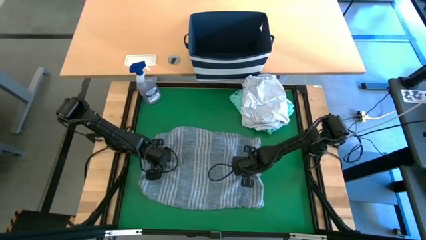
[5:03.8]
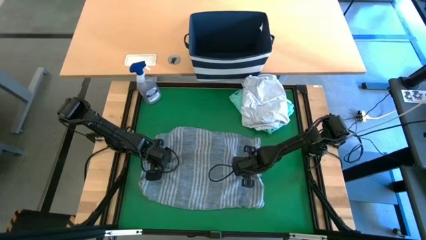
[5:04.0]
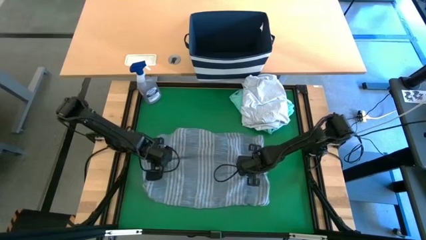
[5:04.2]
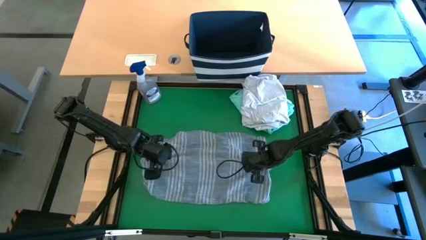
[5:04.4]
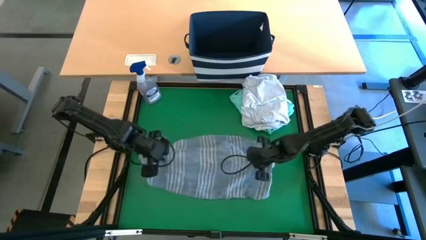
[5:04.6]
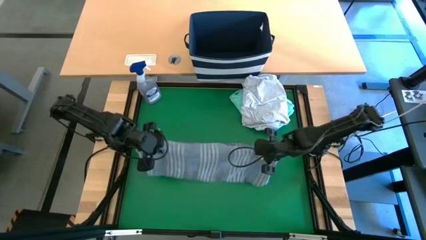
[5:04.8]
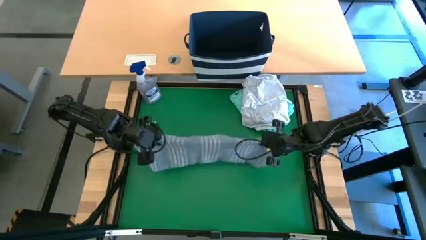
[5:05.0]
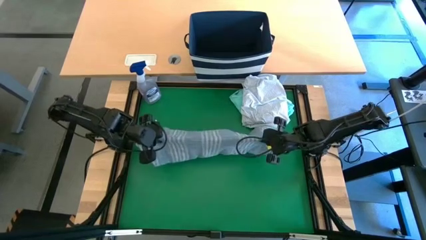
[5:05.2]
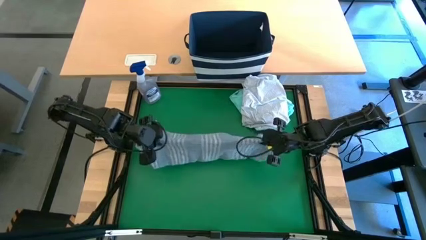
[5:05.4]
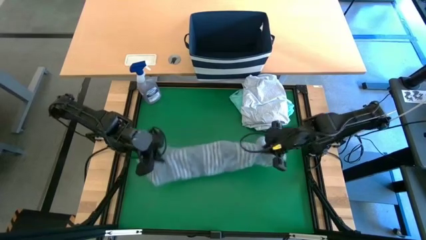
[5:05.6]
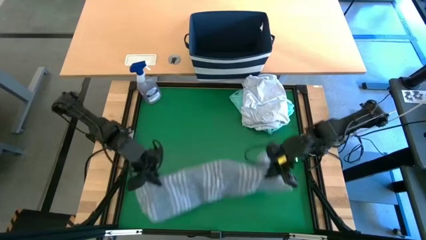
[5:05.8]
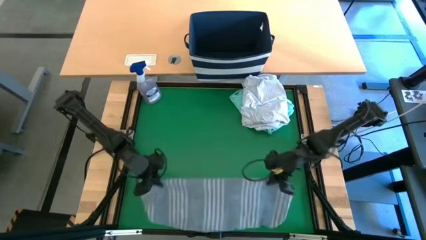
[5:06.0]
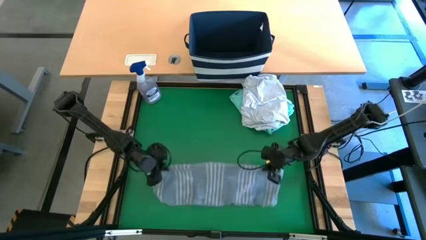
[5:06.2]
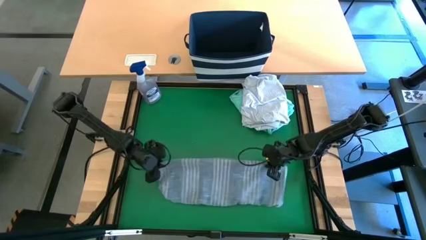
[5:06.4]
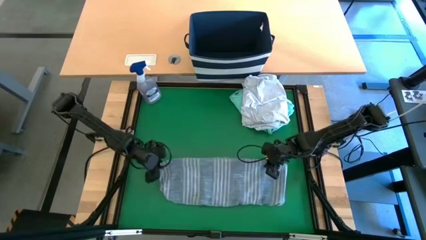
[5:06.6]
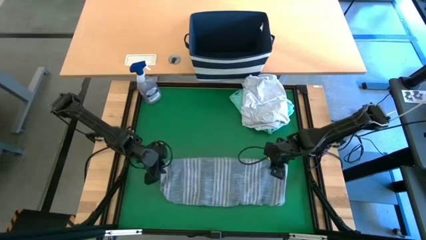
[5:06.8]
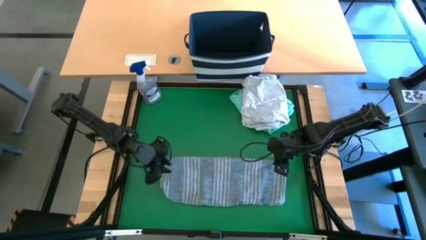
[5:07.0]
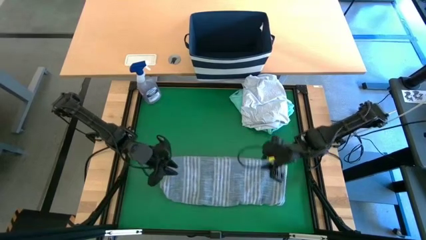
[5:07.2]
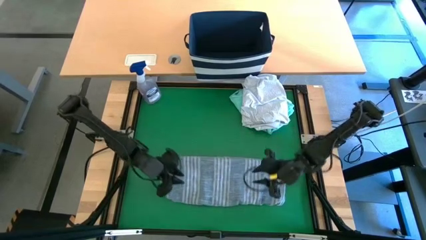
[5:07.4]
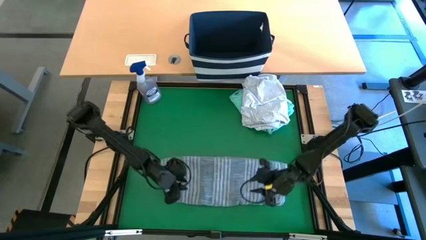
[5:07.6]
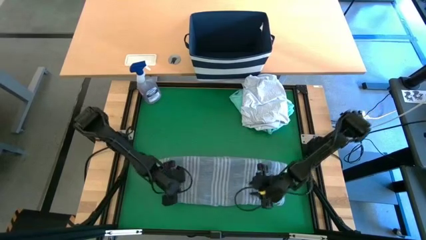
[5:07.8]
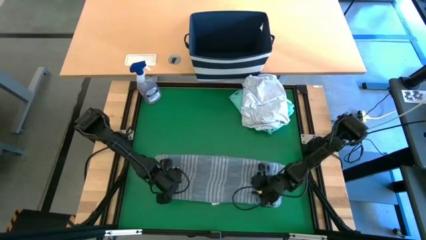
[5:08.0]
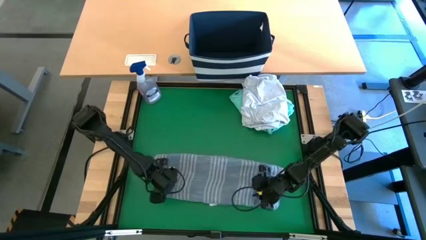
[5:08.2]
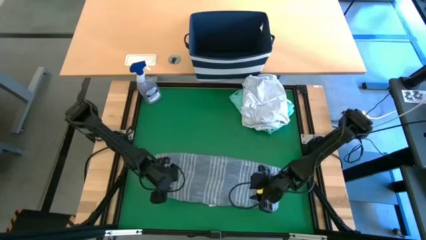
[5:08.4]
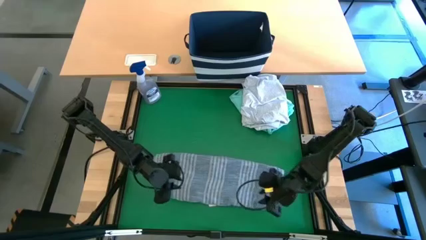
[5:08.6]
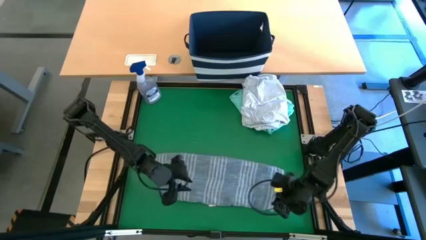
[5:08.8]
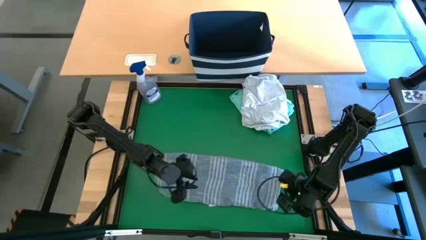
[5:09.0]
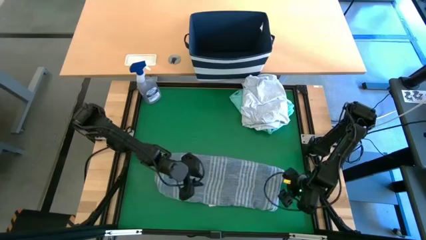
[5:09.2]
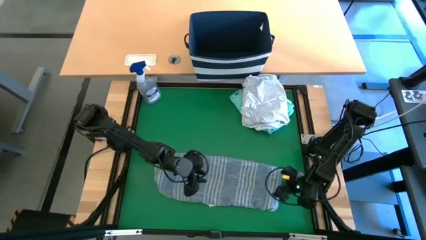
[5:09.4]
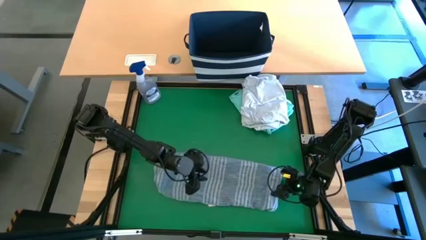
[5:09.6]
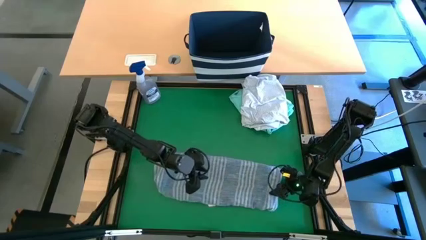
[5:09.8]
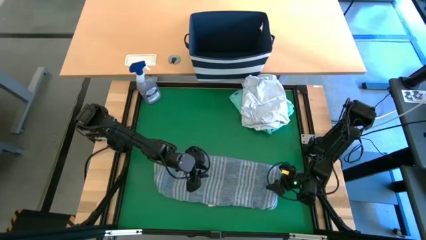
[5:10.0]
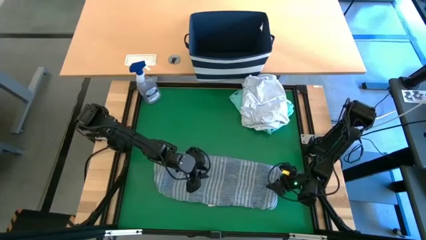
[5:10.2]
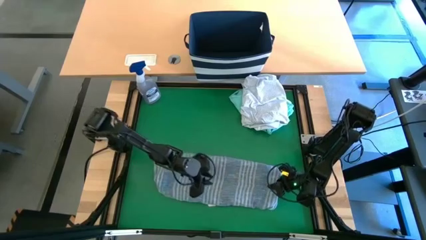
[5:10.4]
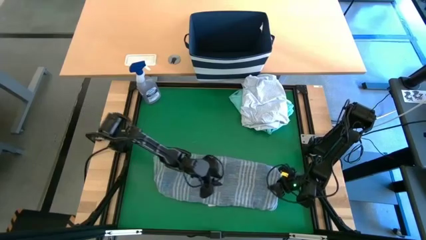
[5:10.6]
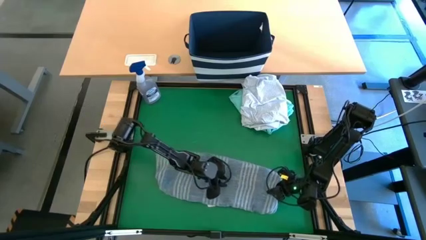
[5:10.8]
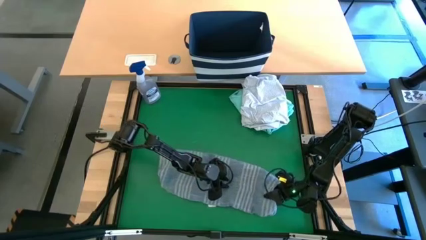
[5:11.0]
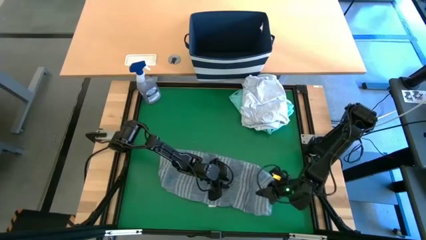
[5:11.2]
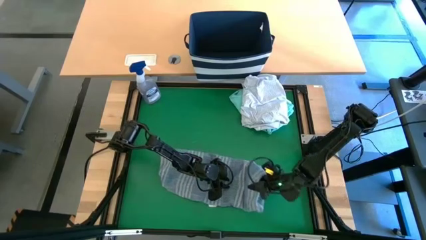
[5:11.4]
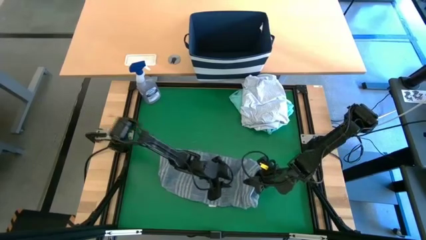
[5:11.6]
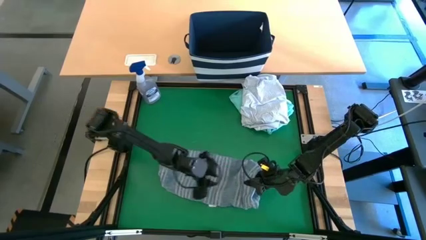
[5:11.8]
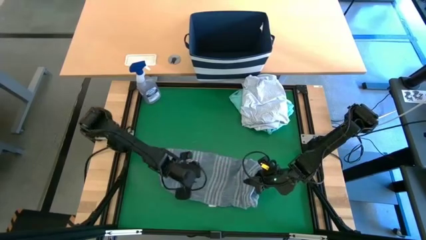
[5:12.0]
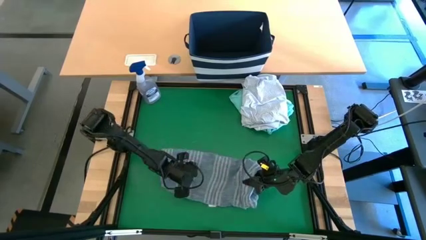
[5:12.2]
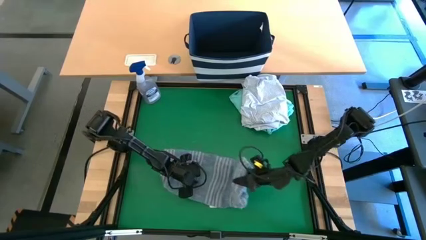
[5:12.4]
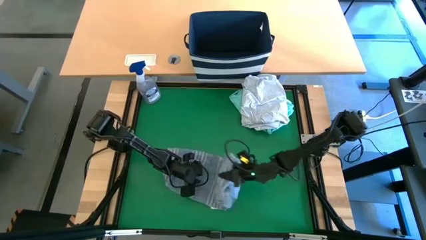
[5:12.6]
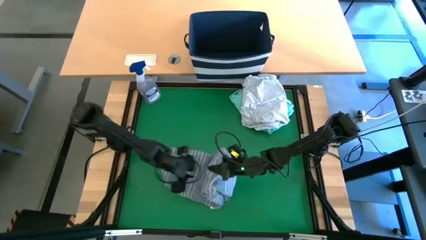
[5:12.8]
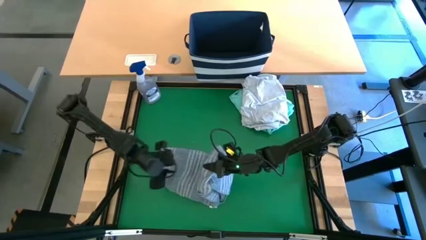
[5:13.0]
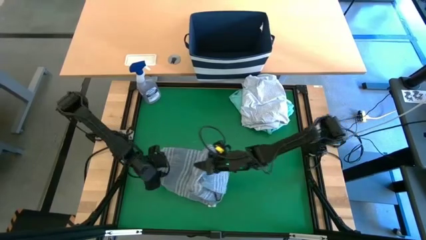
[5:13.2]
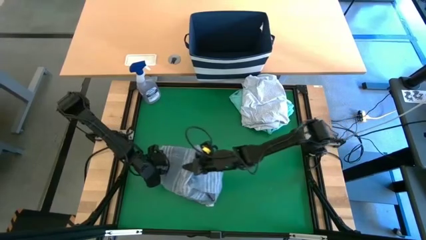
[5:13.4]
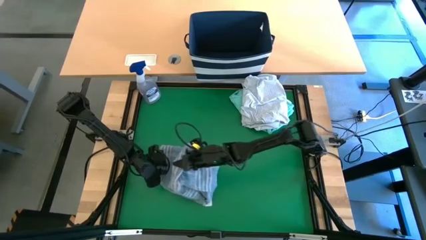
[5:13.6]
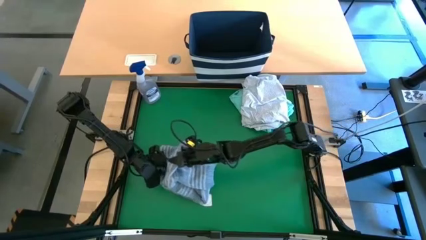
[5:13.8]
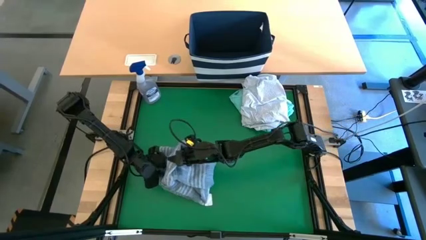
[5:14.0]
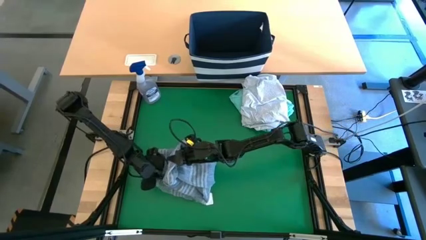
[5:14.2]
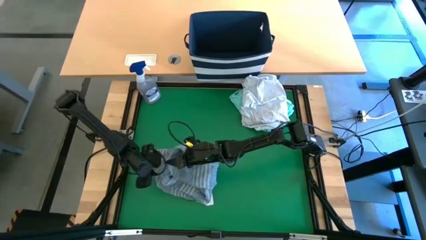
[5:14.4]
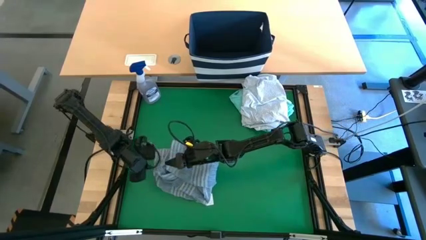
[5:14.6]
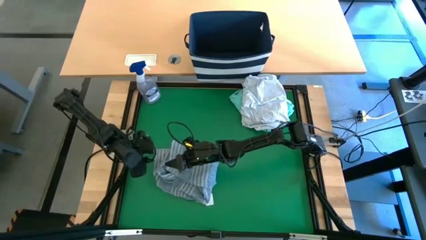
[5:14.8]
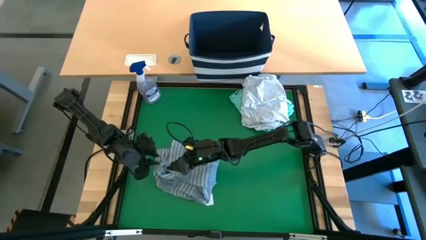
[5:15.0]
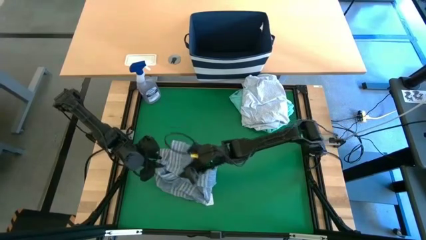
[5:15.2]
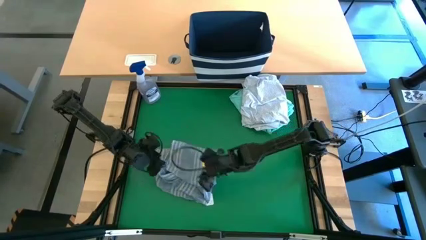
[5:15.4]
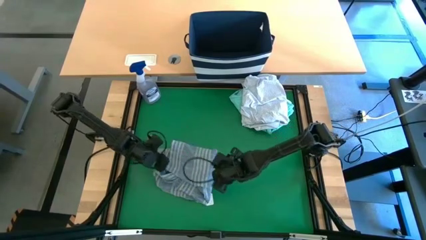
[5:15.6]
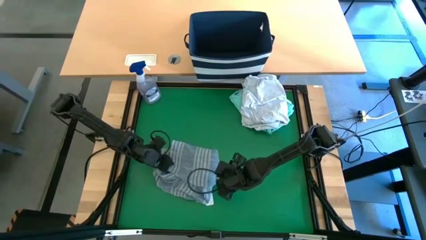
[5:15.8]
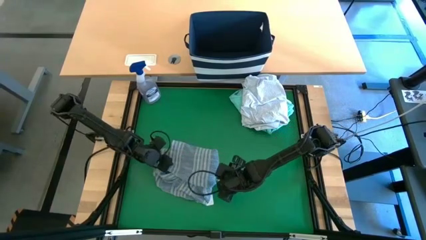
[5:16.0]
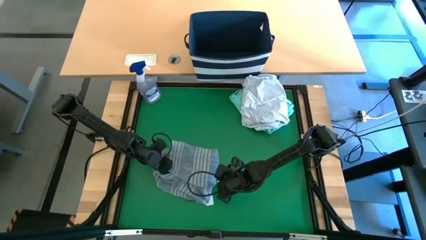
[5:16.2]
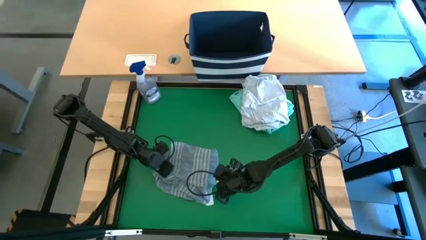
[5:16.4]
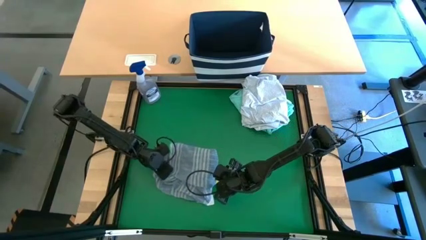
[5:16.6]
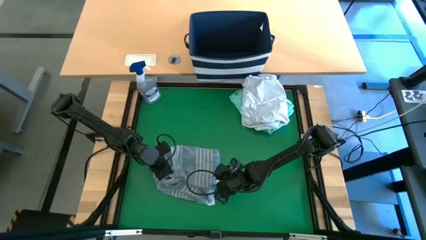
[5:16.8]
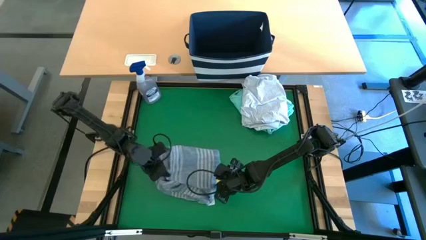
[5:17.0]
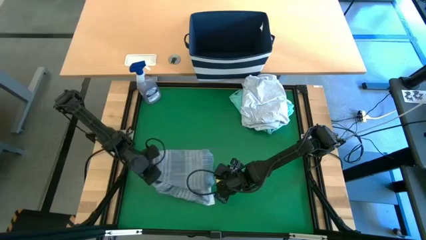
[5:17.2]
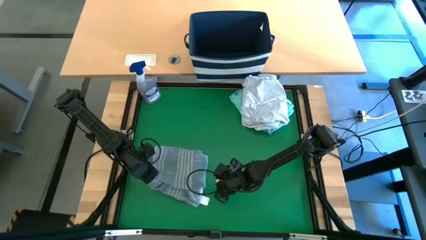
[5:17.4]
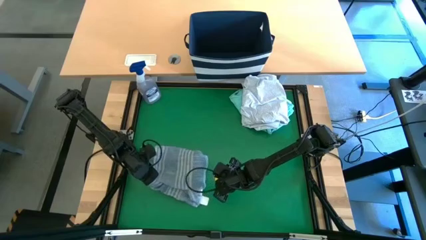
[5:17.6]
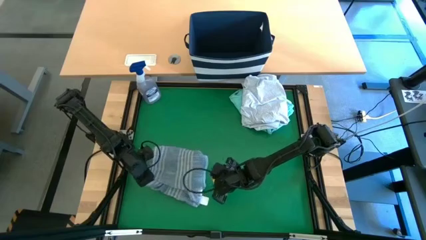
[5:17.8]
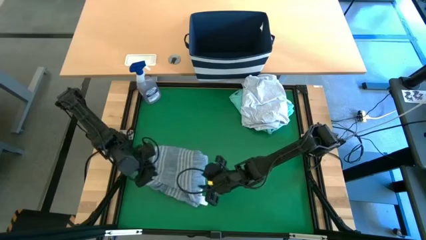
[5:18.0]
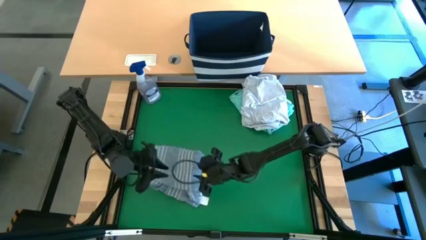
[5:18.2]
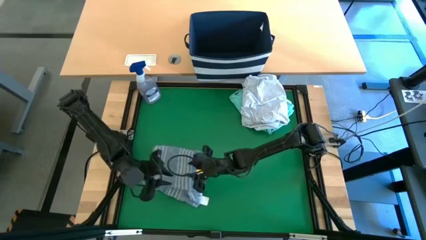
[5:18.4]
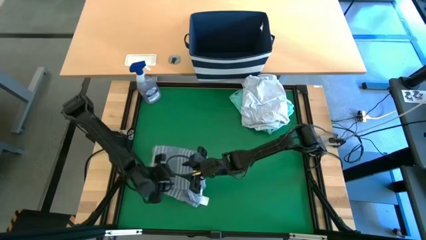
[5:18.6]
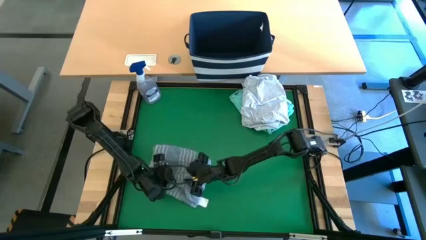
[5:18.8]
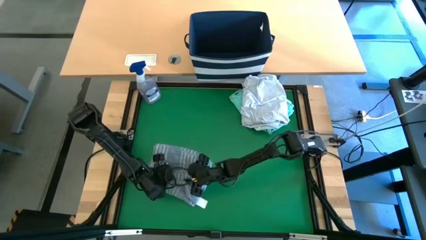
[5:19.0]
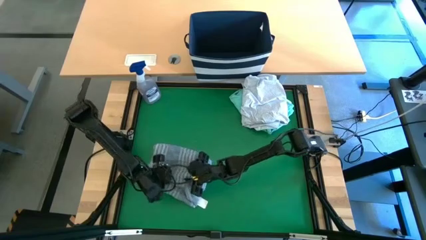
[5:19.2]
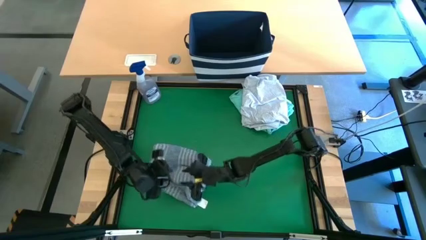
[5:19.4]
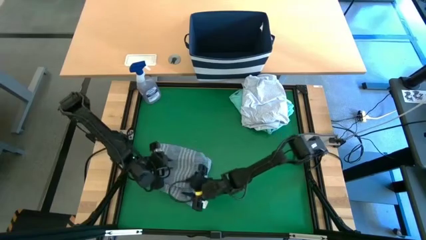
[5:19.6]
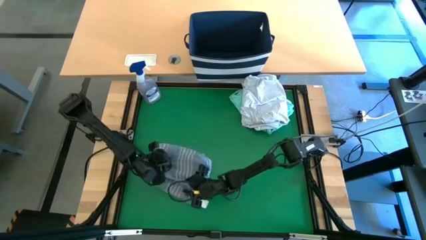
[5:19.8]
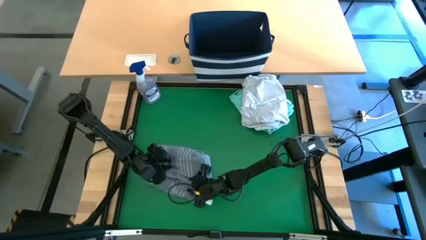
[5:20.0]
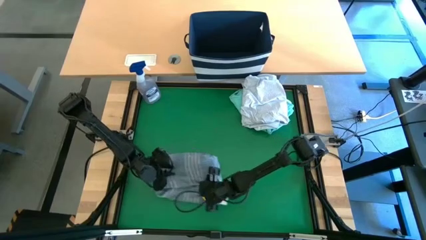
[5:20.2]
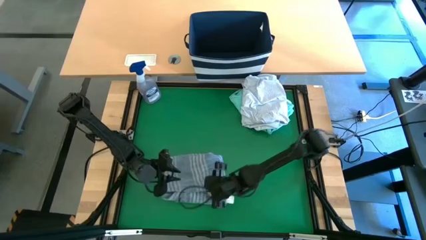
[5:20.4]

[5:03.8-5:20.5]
Task: Fold laundry
Fold the blue polo shirt
